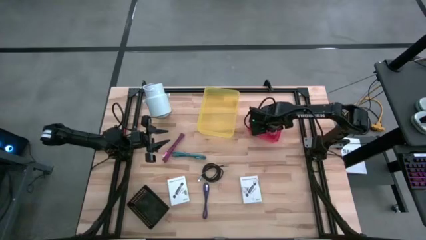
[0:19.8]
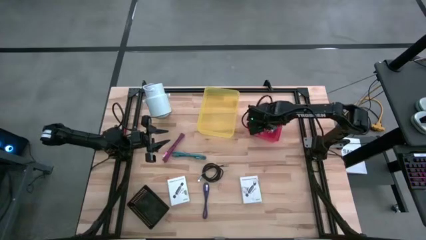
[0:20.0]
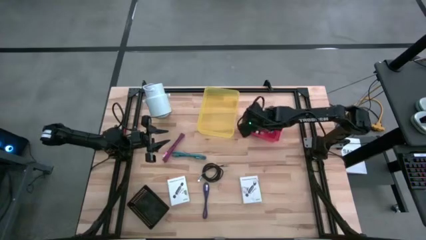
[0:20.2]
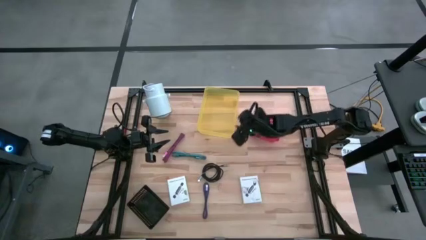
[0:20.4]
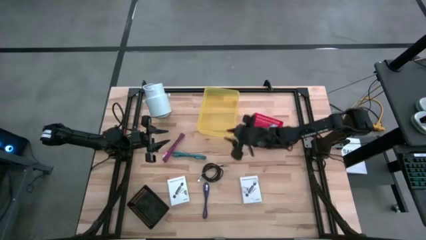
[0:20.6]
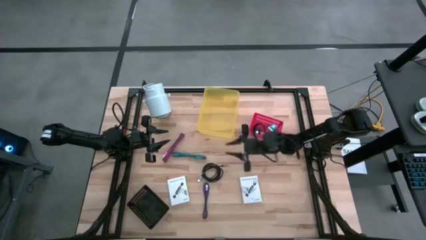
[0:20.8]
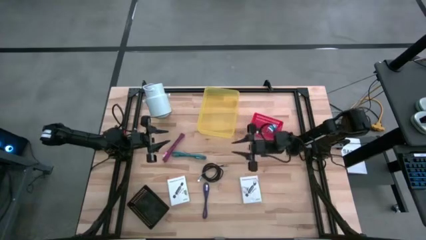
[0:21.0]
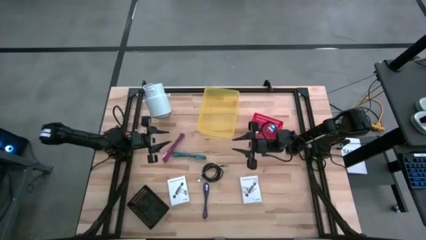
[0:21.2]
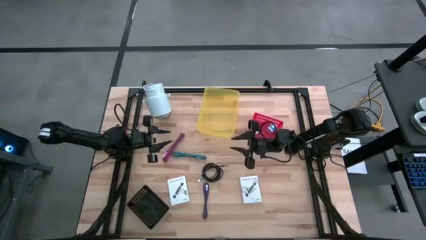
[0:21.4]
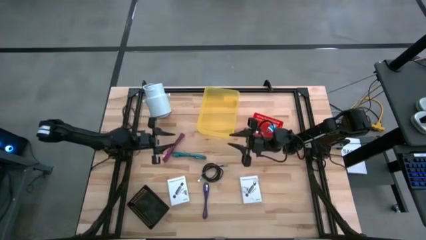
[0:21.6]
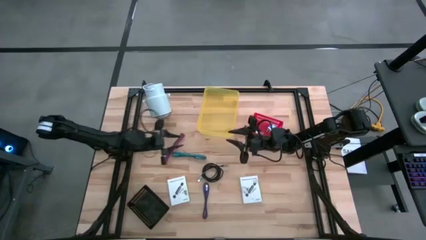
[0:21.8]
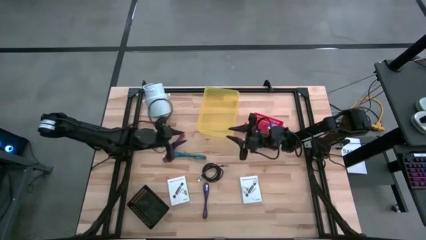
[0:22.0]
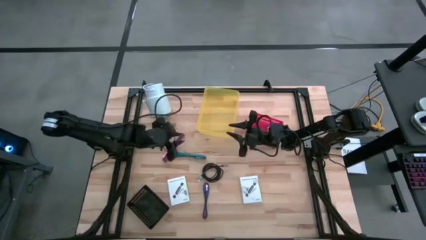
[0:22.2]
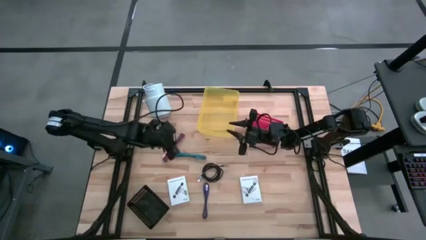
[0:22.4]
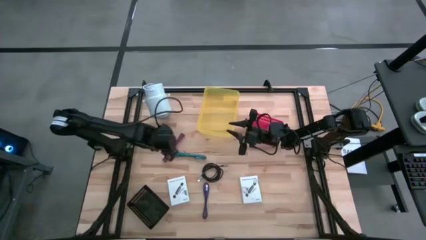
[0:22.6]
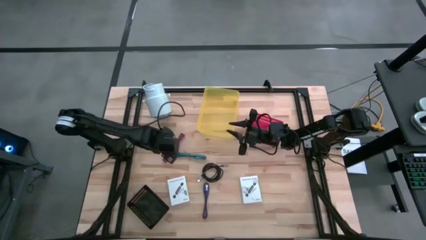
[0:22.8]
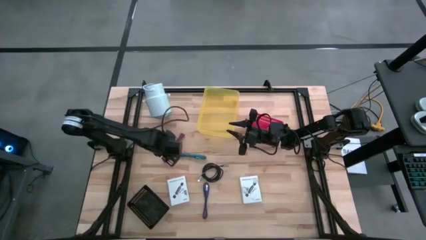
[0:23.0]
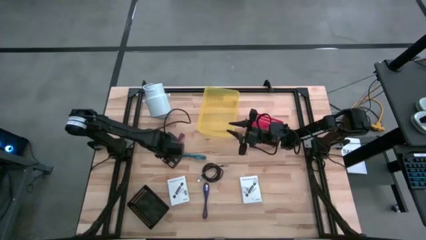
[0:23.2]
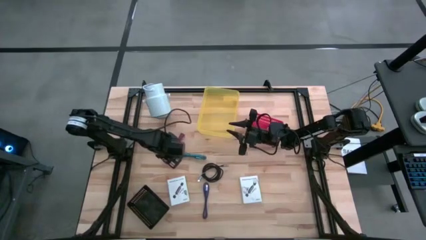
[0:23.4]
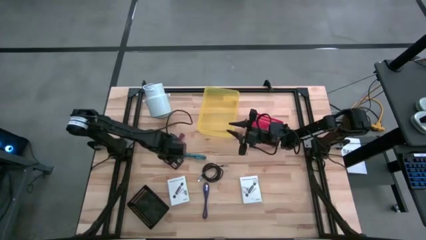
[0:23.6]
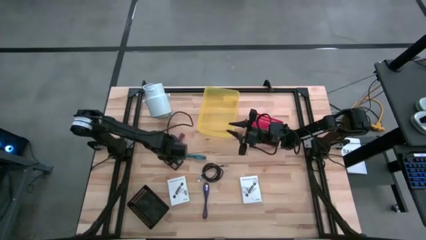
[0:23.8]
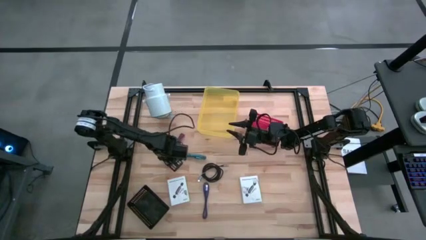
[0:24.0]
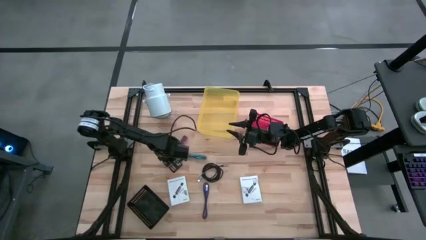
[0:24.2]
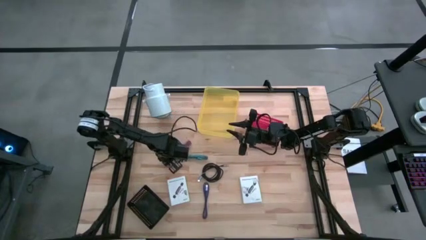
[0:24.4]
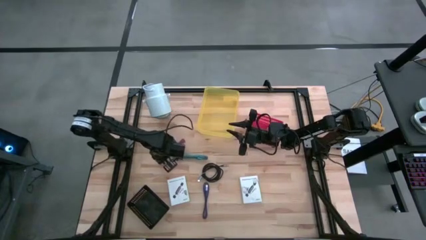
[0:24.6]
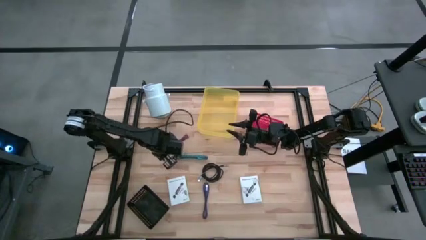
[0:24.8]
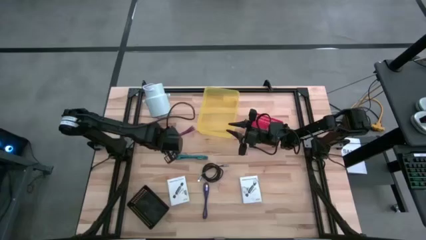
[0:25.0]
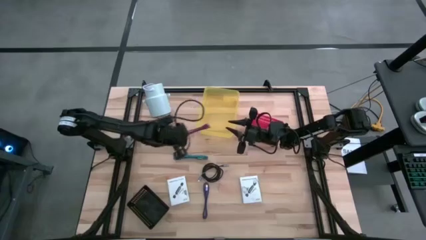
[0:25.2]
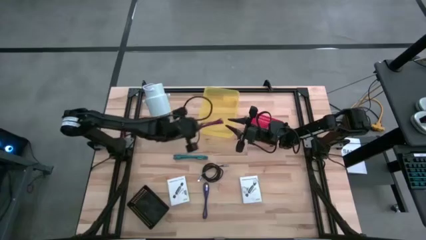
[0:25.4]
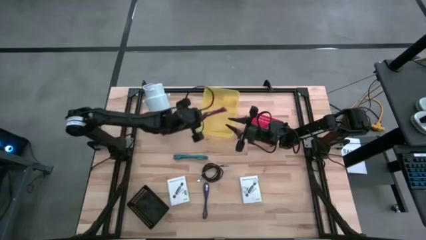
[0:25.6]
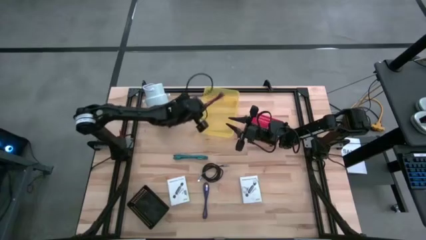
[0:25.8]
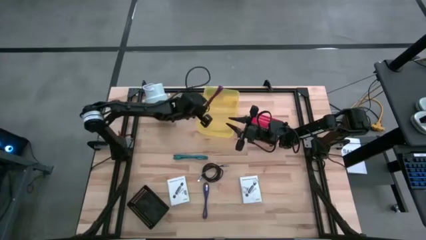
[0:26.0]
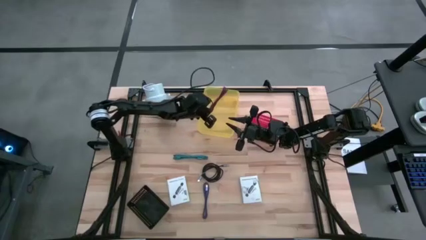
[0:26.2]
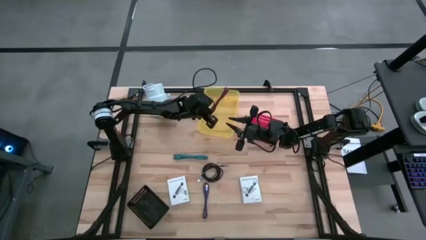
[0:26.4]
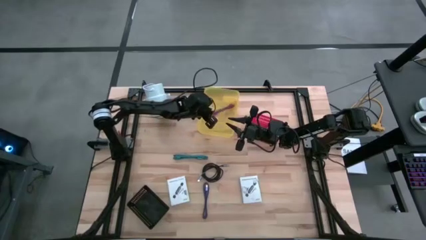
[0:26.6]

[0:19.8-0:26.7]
Task: Pick and place items into bin
Put the pink charger cable into the yellow bin

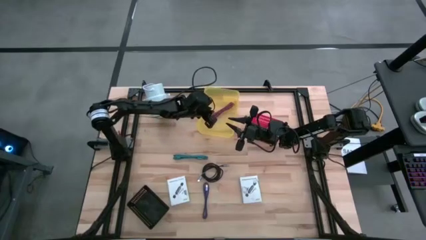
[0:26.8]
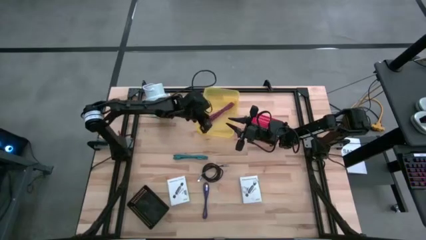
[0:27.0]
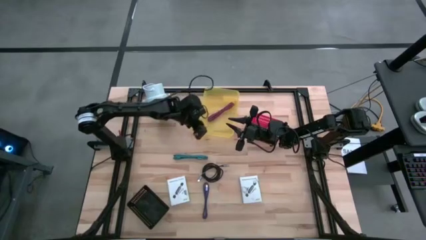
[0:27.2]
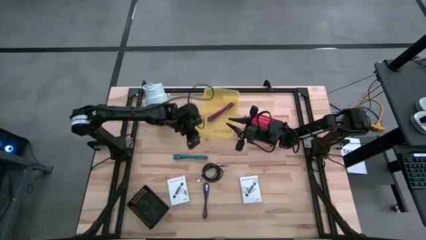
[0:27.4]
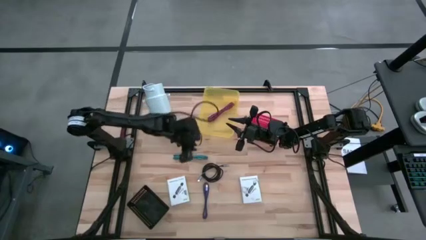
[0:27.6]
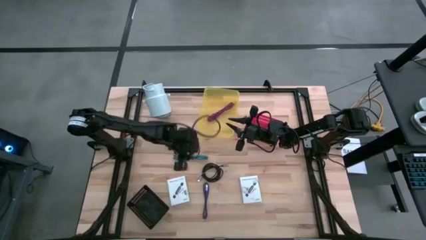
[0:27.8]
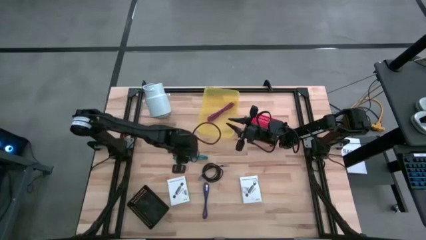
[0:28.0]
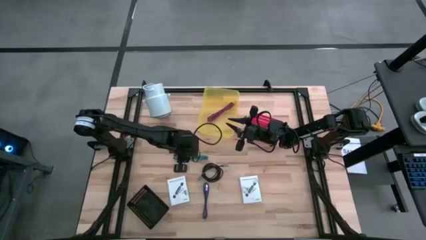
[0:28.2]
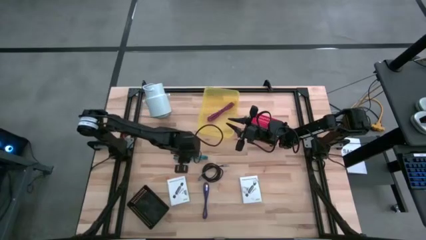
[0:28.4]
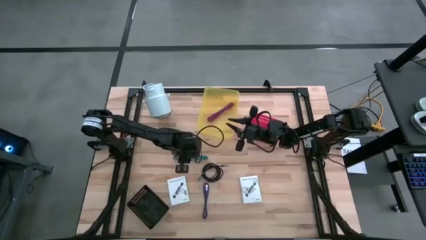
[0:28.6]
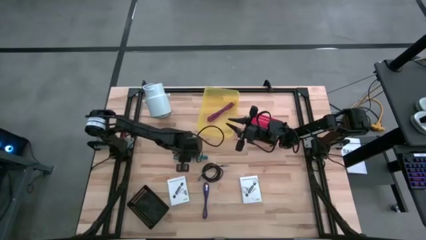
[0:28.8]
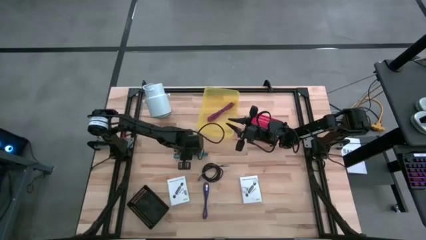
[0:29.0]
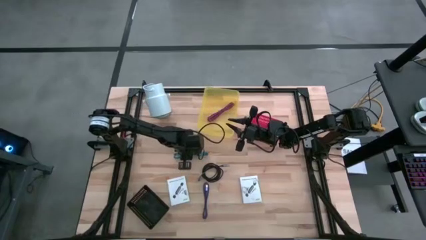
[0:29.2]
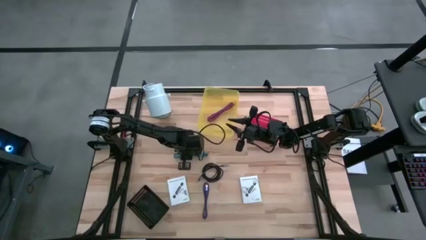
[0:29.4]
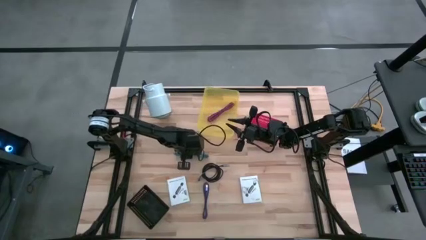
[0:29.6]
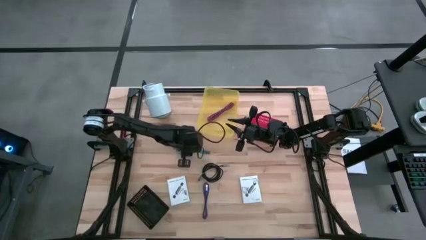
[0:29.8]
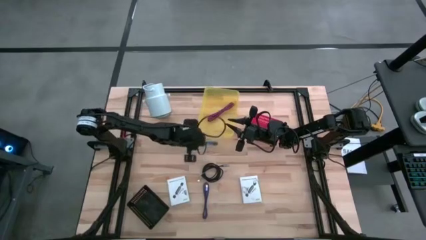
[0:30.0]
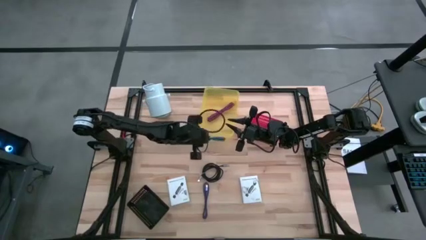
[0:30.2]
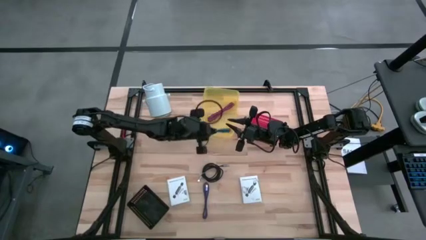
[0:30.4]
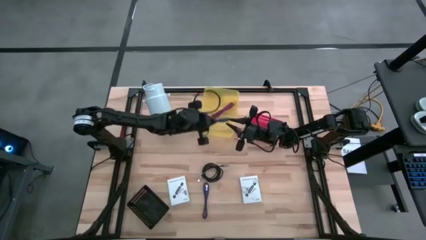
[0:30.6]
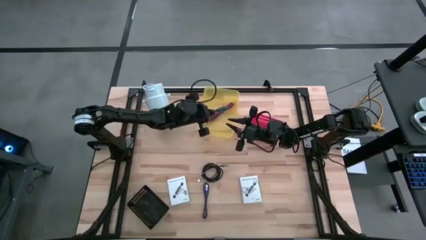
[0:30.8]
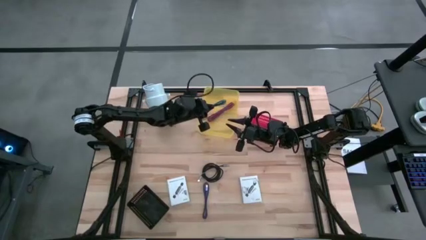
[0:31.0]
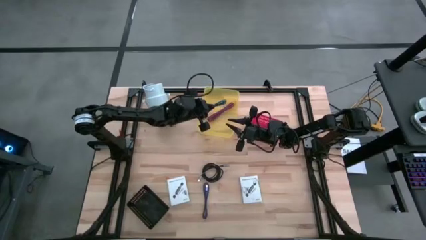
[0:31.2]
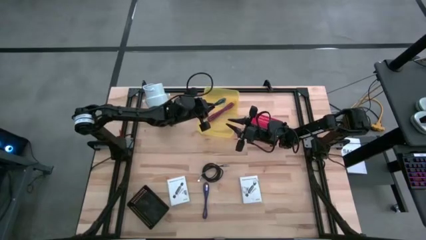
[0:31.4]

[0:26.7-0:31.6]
Put the blue charger cable into the yellow bin

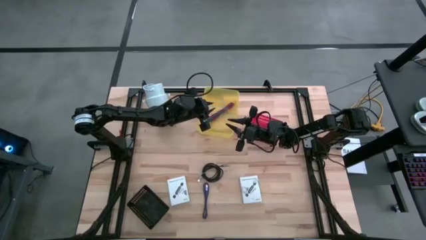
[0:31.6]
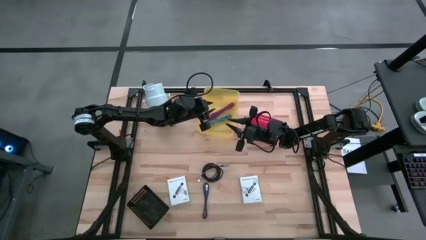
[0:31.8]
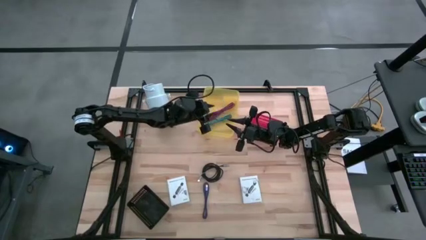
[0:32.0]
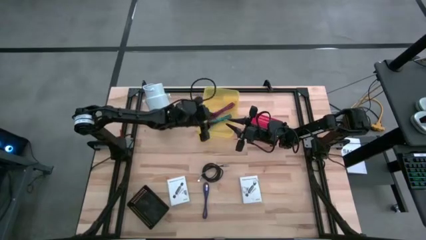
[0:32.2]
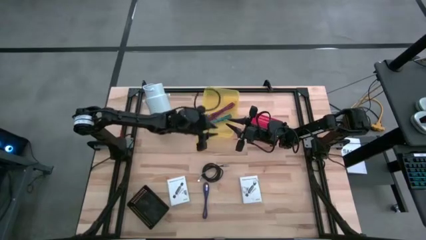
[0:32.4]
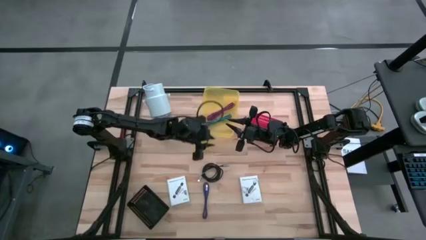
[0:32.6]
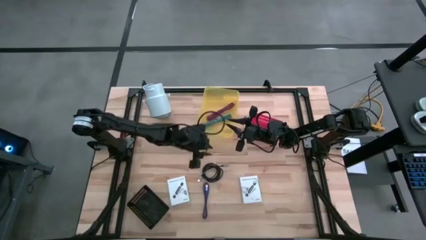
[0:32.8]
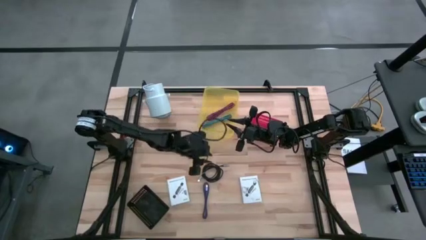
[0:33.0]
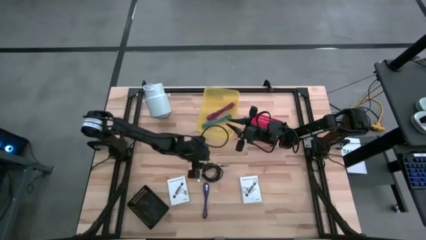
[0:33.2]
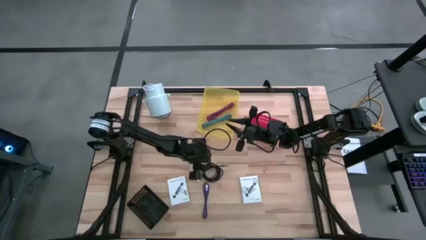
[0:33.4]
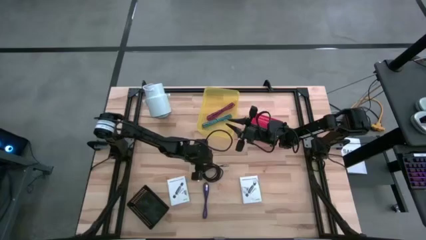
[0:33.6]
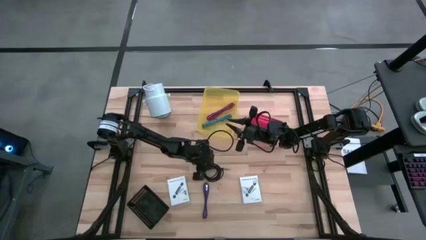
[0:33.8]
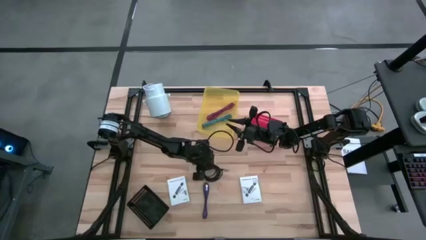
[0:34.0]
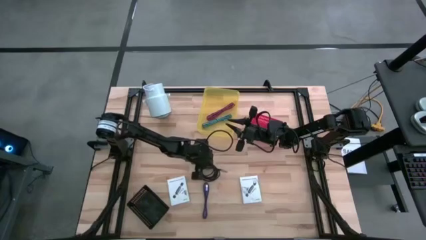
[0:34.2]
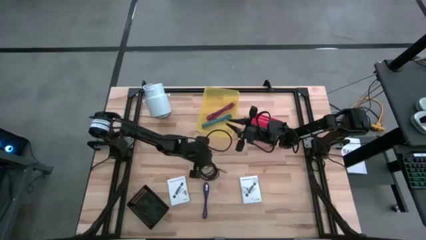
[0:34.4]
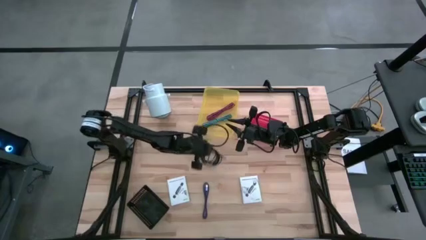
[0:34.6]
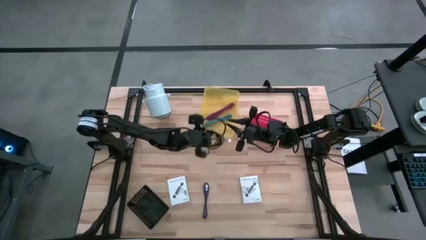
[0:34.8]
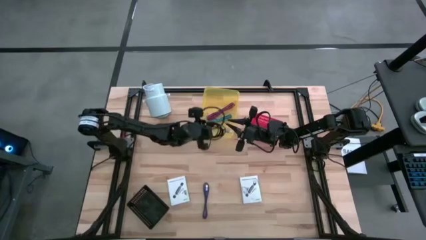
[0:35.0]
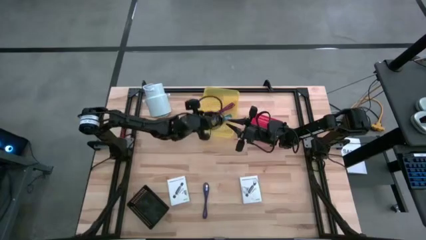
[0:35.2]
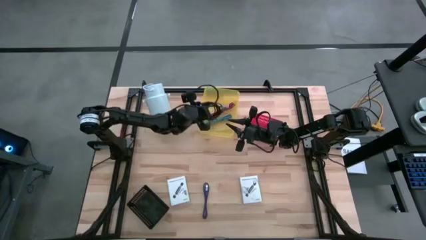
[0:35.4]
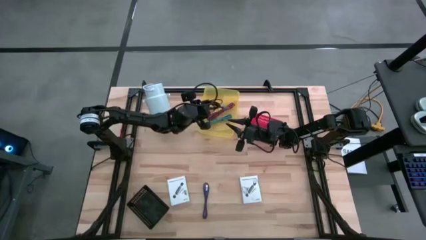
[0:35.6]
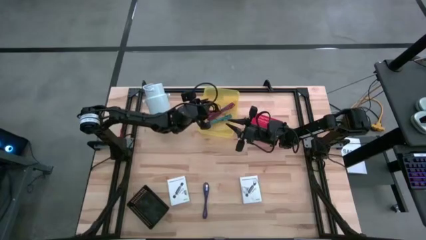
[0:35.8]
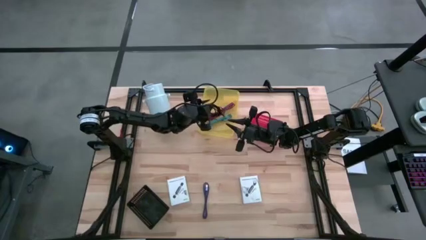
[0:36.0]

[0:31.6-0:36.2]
Put the black charger cable into the yellow bin
